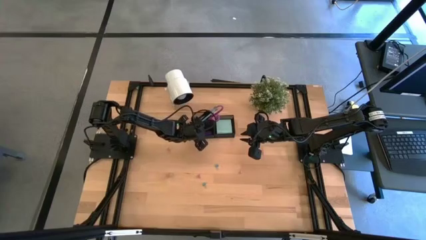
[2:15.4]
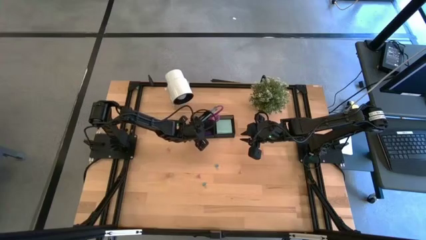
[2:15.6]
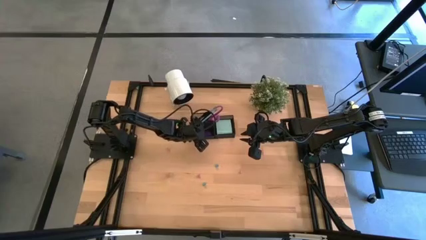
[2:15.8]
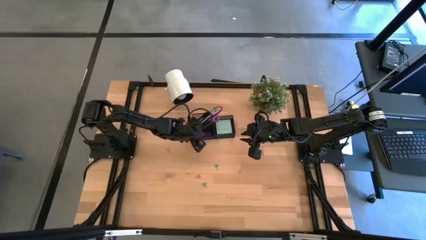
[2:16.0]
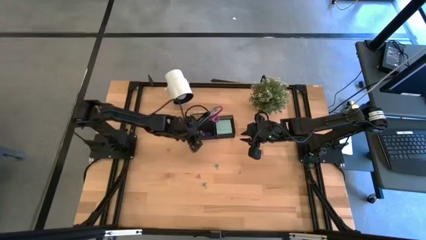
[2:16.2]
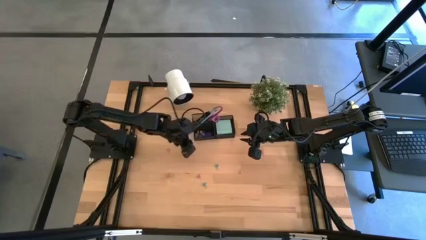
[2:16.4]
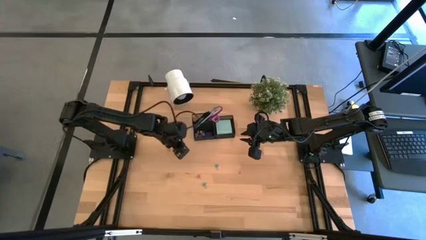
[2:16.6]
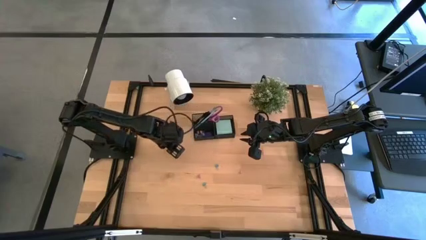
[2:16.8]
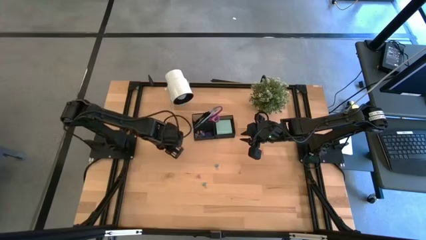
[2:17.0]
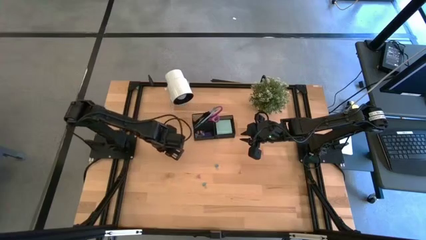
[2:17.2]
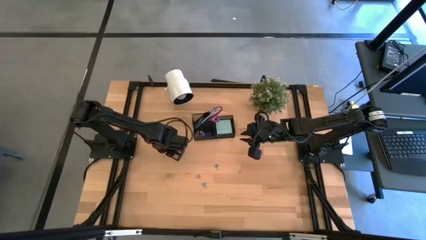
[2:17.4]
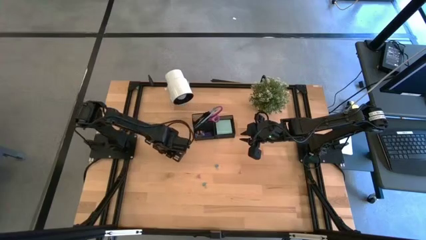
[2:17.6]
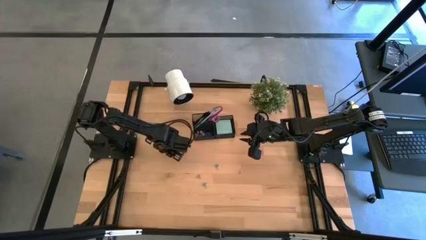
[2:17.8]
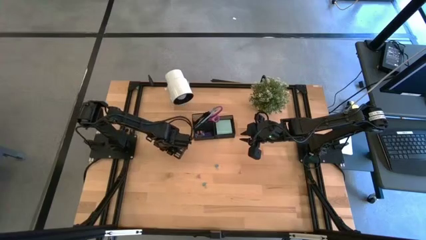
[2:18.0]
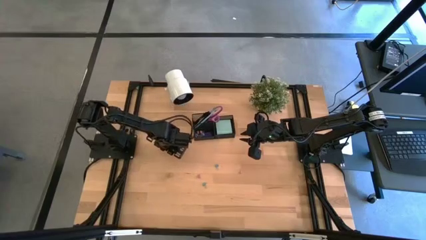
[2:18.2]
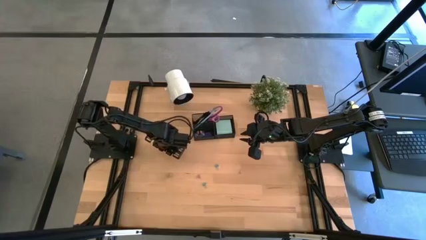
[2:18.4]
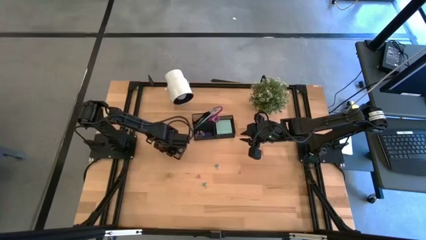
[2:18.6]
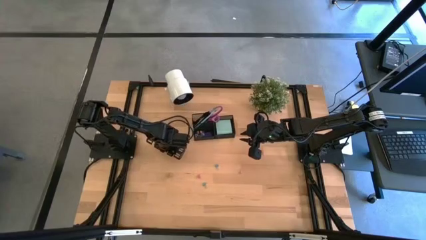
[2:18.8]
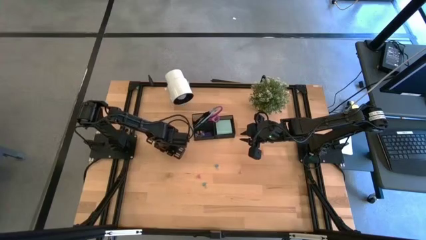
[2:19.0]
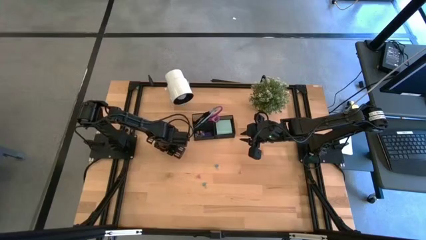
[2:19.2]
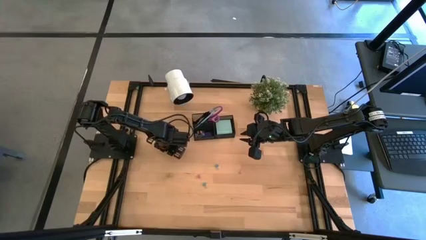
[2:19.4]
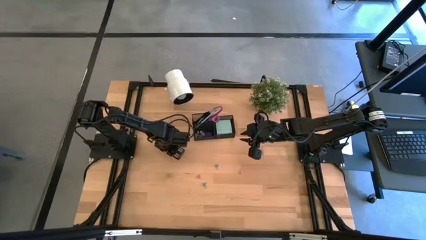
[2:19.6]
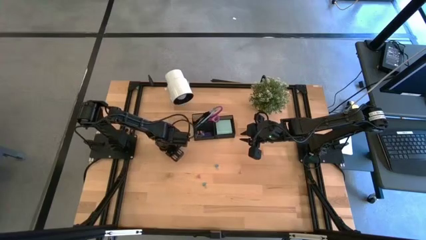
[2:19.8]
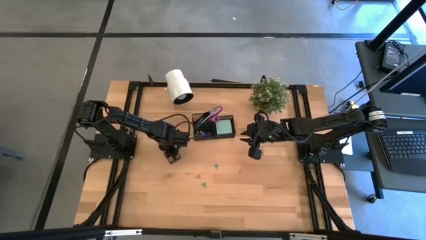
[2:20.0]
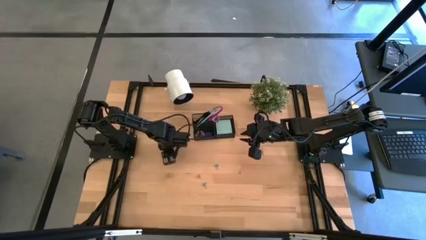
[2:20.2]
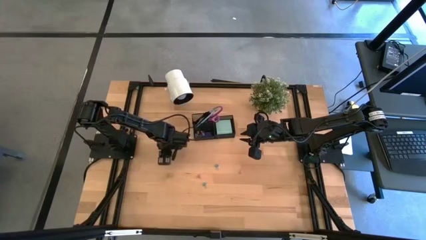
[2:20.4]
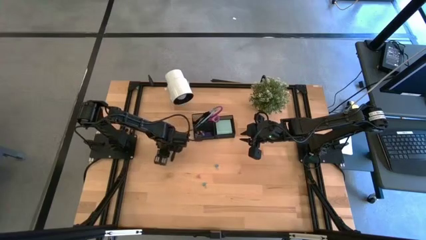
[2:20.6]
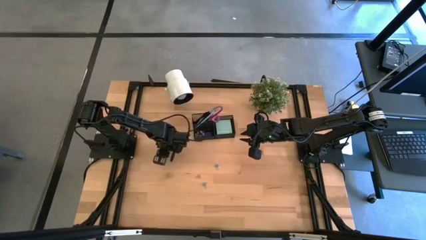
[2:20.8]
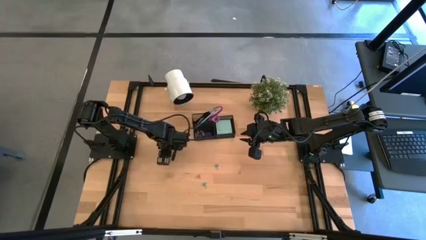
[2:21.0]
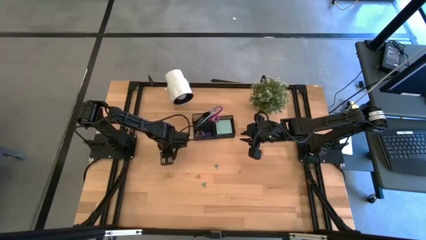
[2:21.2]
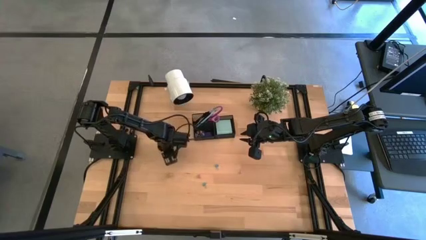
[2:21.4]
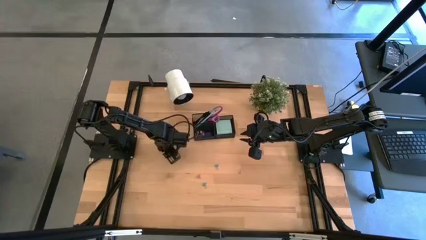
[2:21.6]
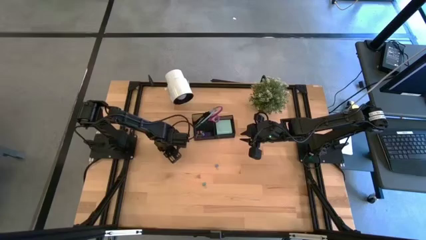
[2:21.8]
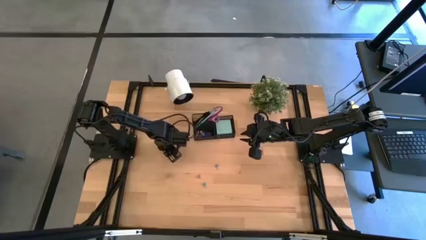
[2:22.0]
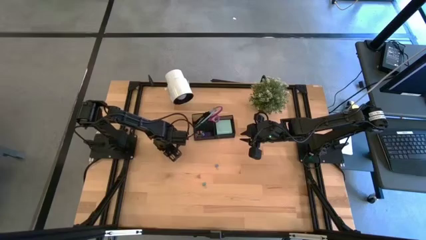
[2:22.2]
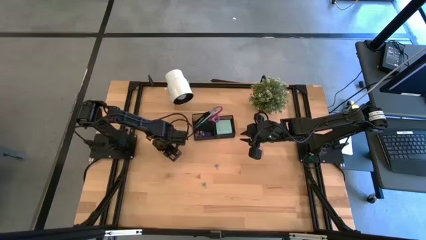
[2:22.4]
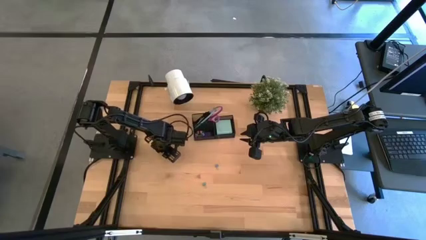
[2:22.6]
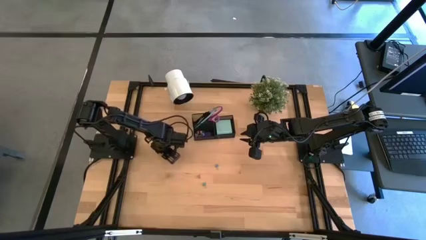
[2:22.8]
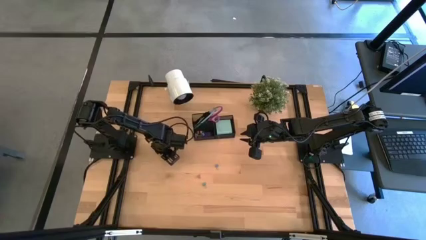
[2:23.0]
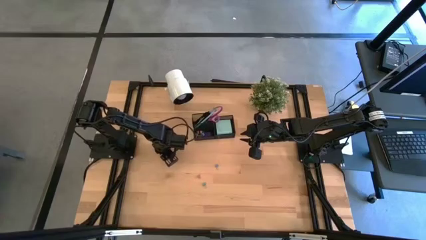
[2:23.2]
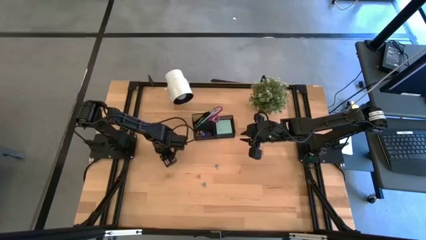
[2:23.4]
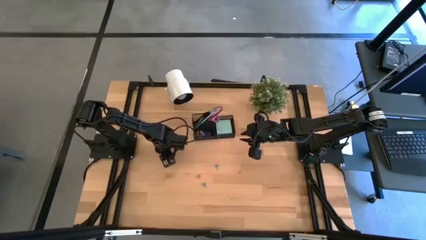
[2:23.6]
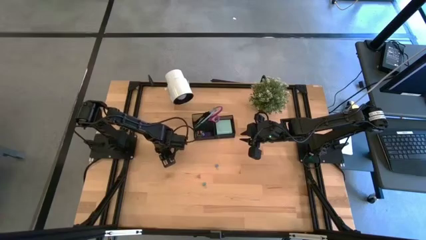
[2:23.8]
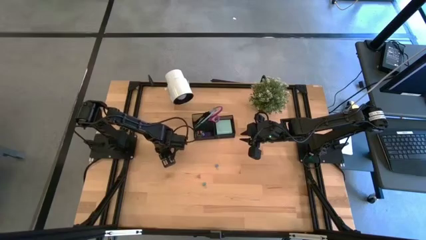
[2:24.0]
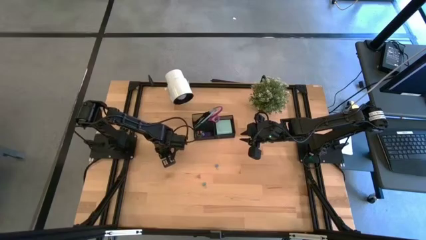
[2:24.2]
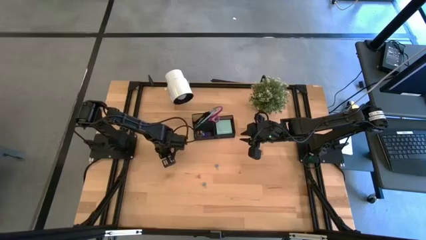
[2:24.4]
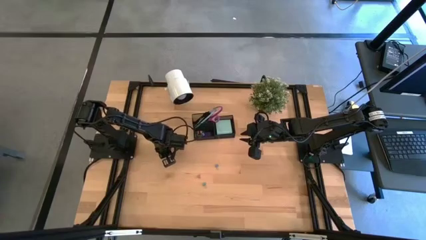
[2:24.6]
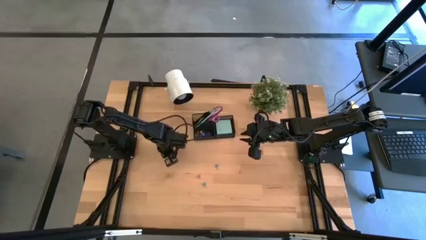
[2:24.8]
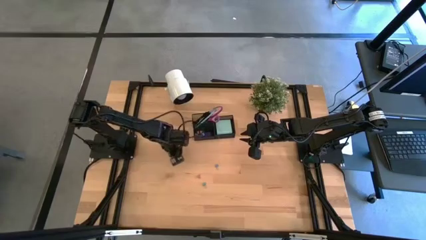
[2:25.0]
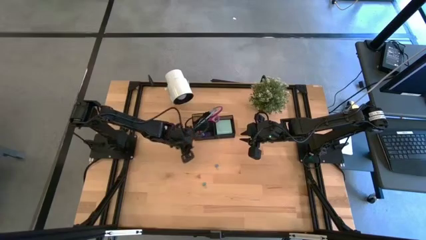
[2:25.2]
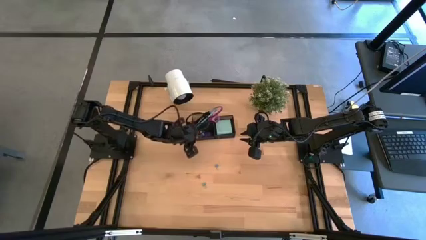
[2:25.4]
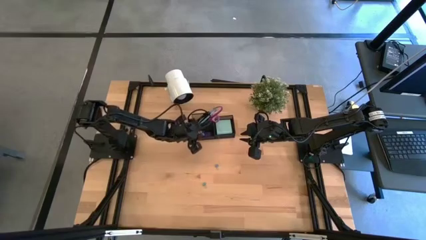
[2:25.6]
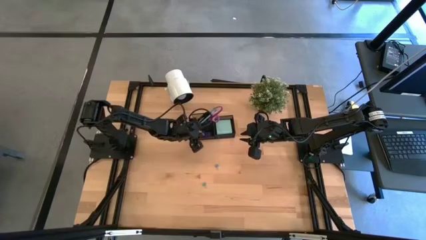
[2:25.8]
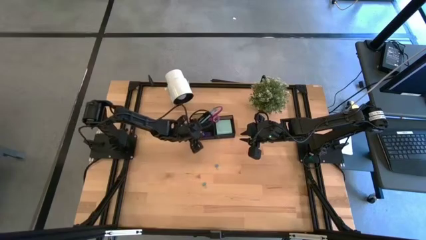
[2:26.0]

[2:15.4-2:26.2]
Task: Pick and place office supplies into organizer
Put the pink binder clip into the black desk organizer

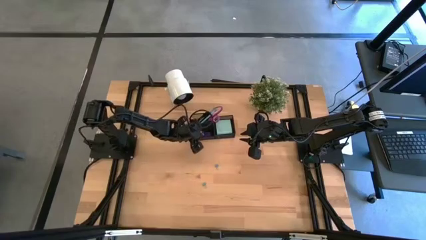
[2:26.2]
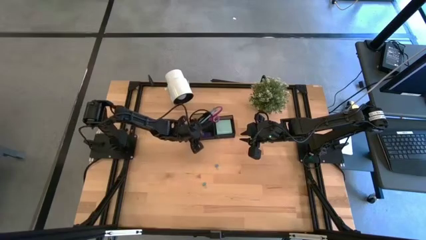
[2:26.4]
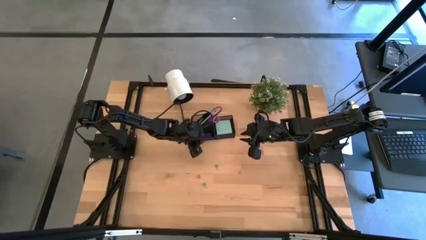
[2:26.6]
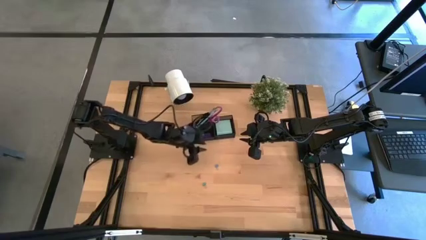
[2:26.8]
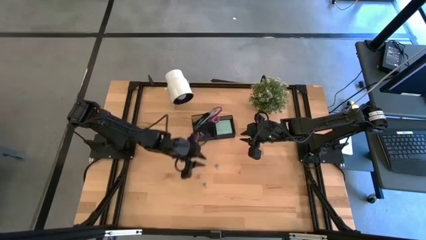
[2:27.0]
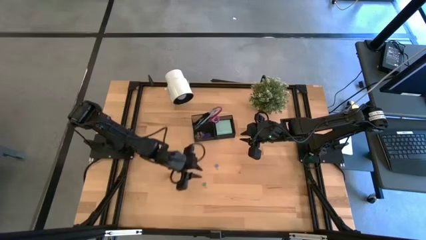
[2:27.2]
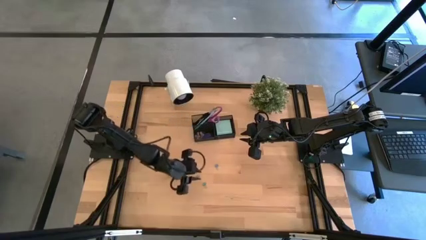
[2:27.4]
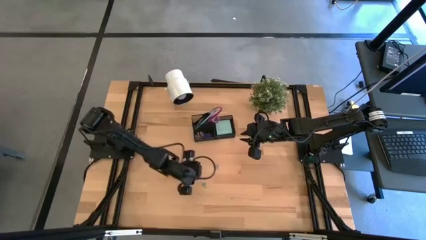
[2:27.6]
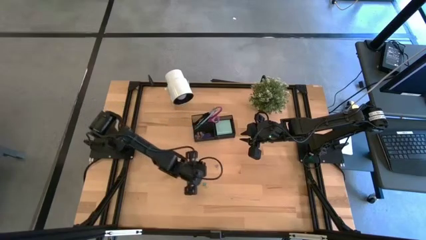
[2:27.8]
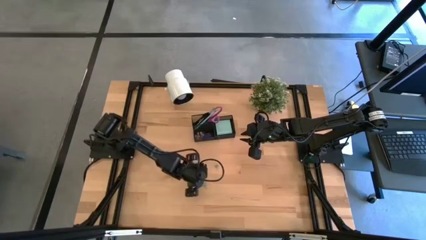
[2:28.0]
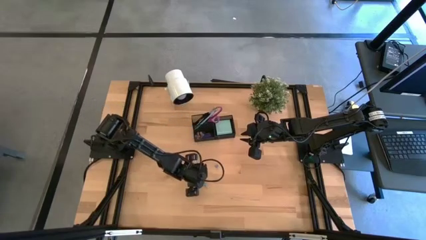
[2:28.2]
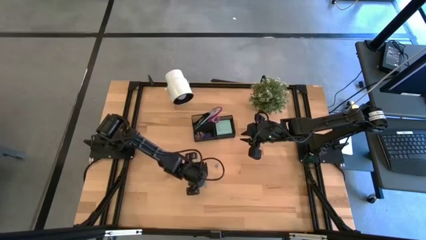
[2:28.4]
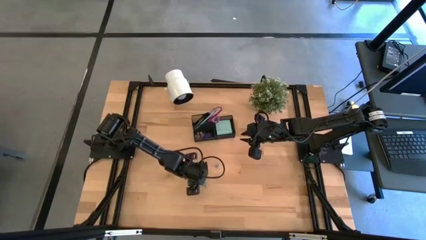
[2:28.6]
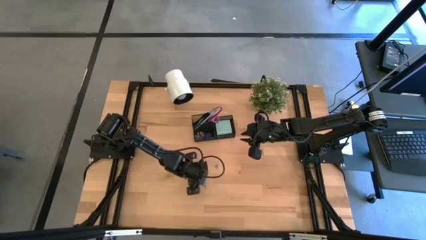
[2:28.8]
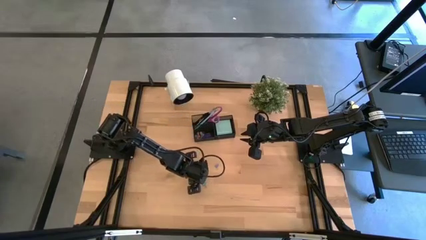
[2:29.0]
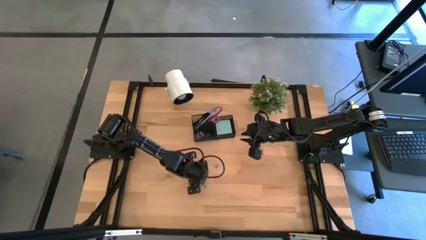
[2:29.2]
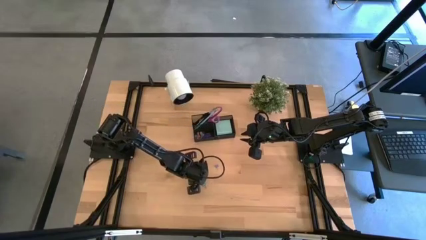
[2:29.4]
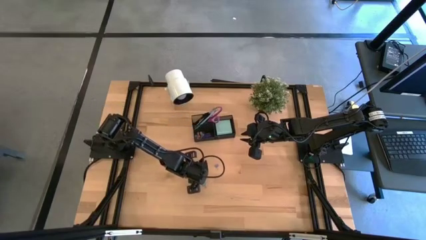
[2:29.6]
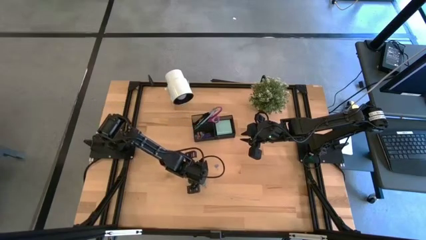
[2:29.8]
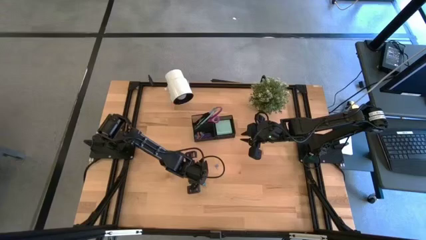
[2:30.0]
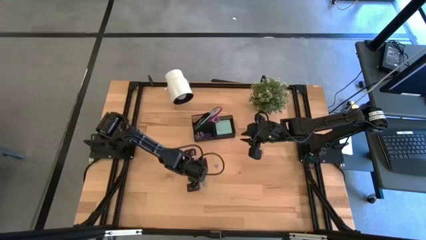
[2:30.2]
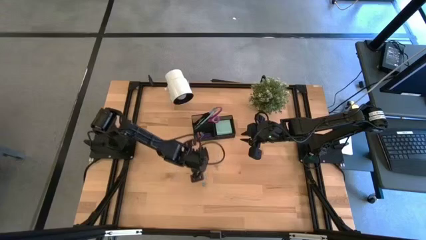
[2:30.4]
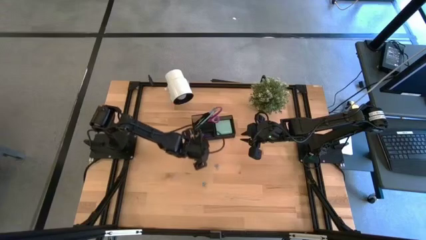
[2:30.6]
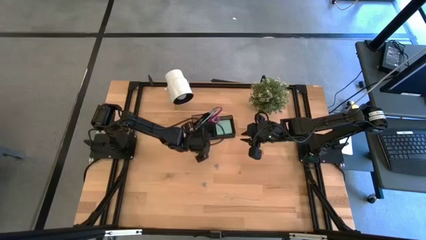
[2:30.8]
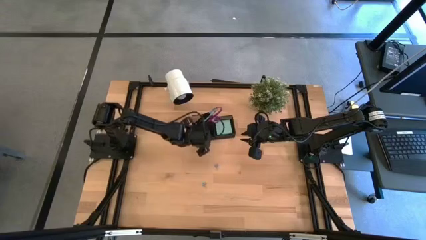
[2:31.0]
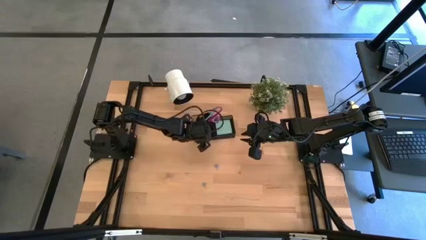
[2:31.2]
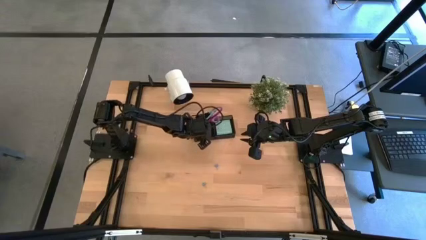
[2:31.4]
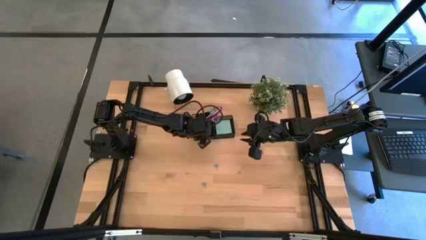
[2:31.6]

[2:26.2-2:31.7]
Put the pink binder clip into the black desk organizer
